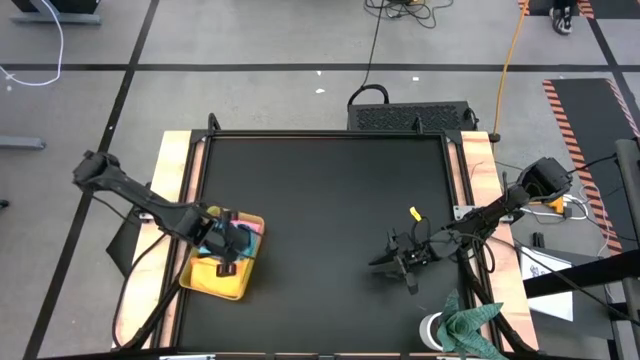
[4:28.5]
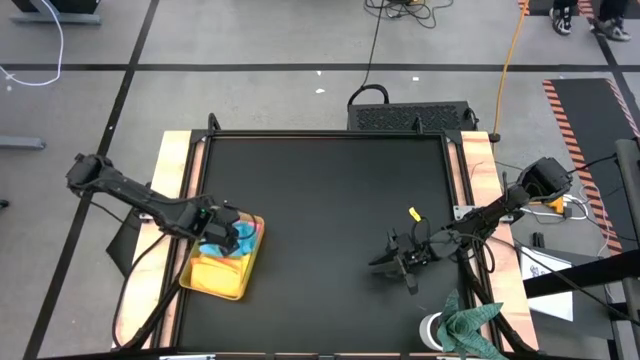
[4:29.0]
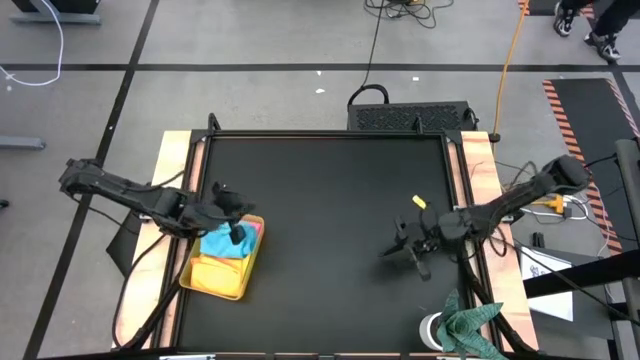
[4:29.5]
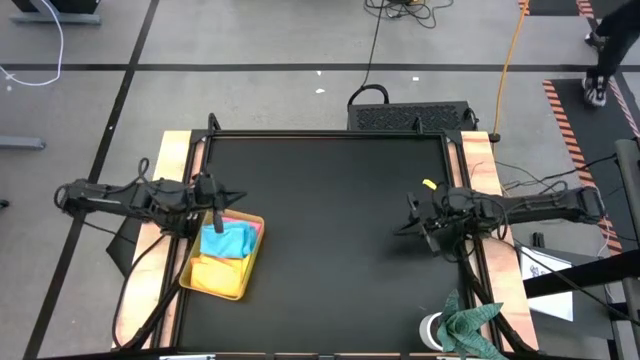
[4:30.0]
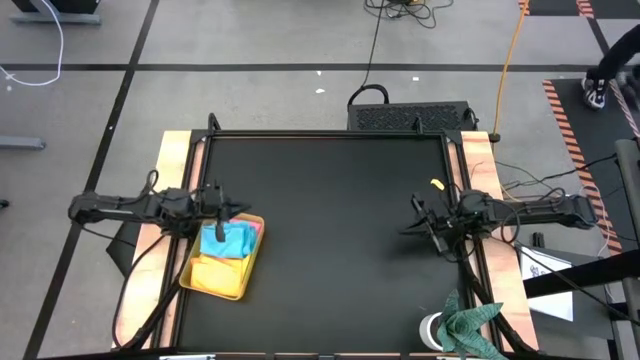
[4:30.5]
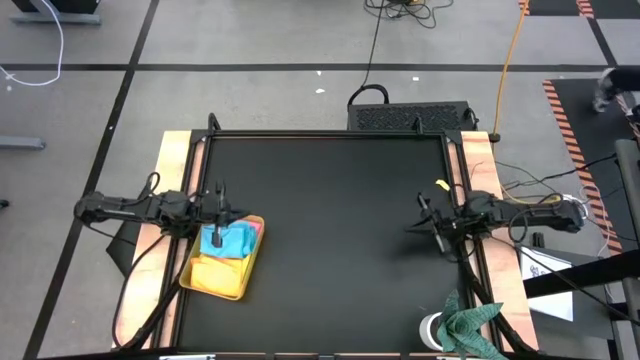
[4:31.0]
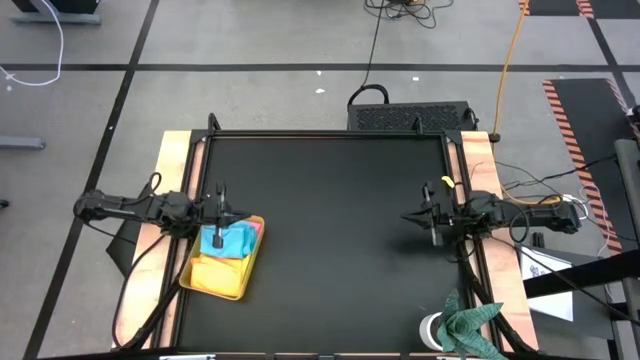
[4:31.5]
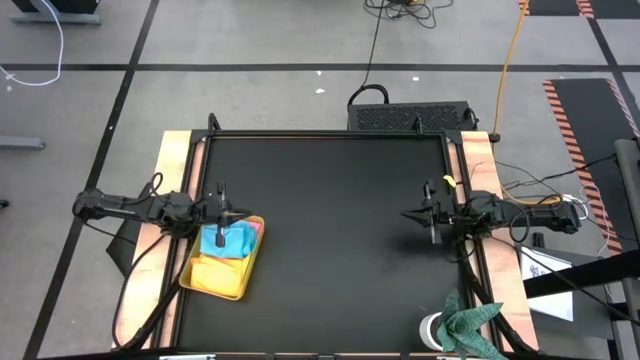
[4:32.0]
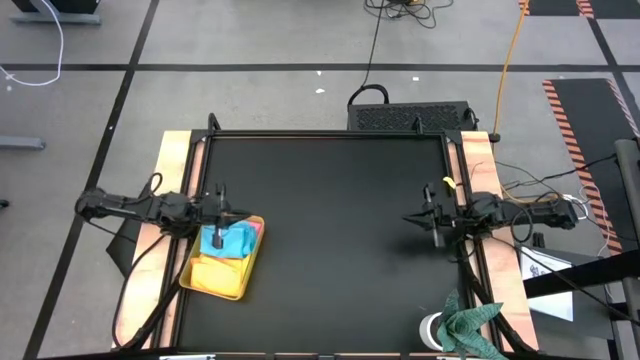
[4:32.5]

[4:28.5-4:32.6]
Task: Fold microfiber towels
Return to Home Position

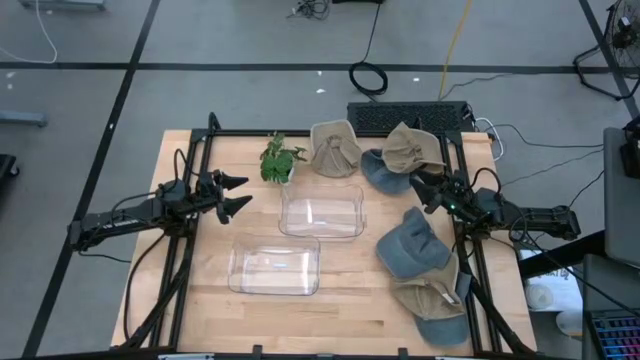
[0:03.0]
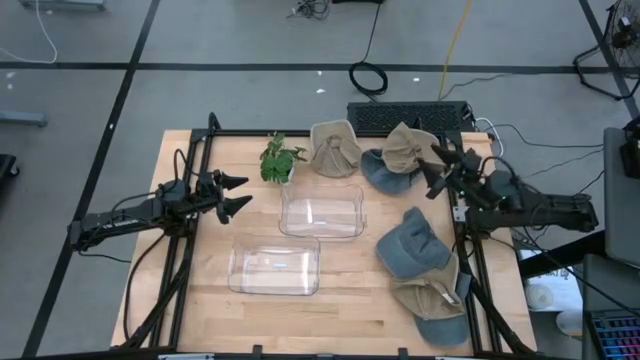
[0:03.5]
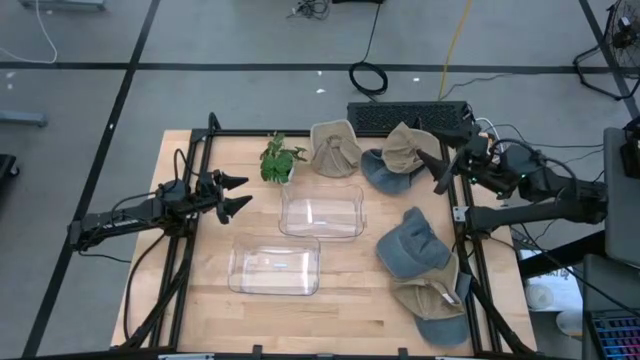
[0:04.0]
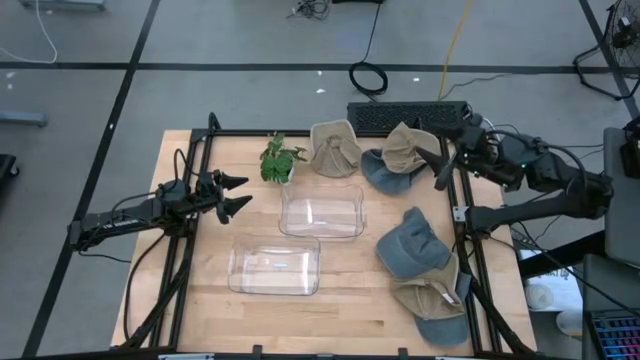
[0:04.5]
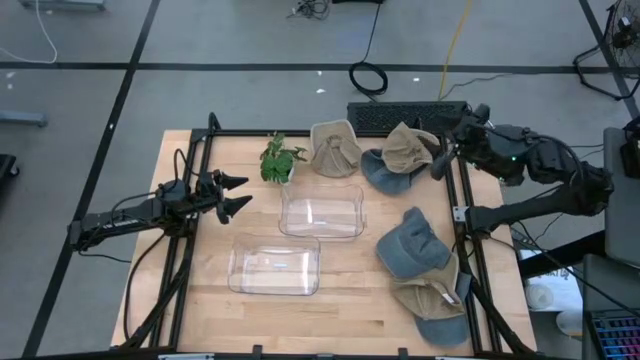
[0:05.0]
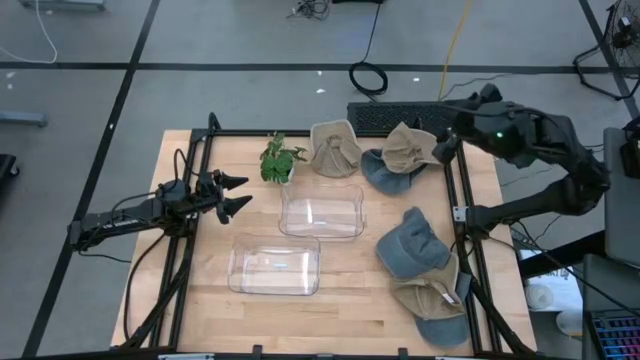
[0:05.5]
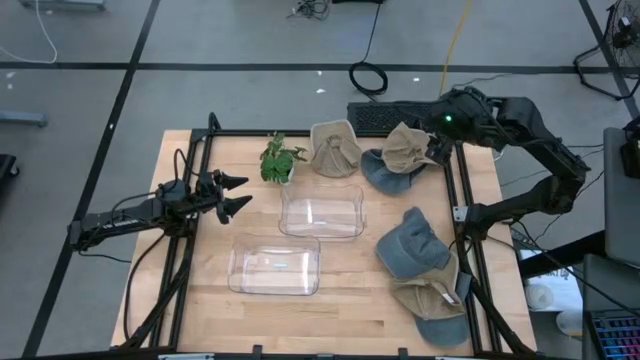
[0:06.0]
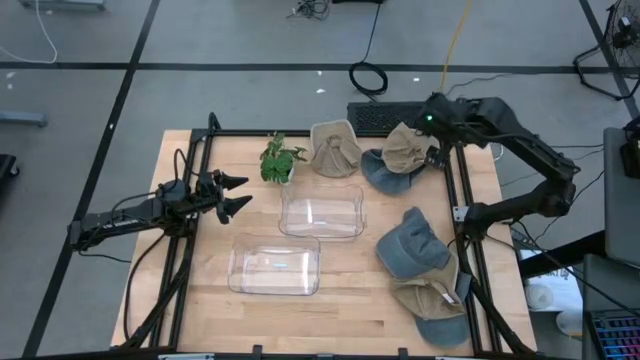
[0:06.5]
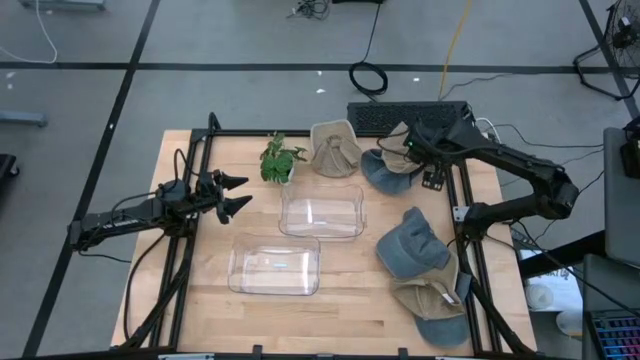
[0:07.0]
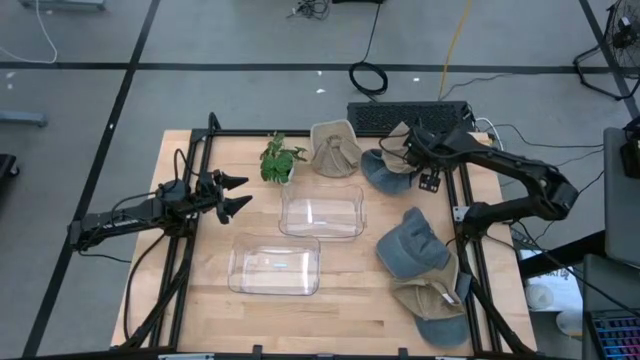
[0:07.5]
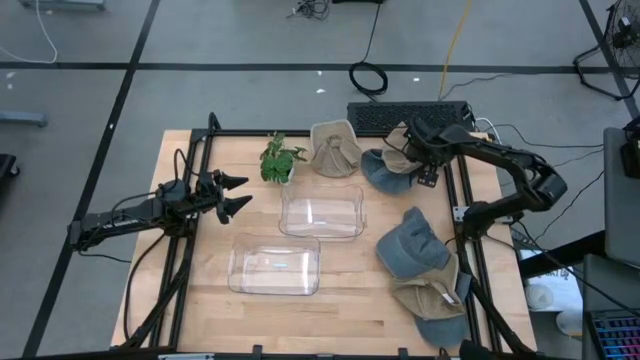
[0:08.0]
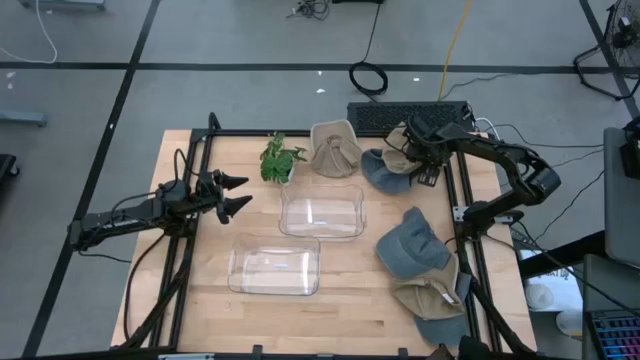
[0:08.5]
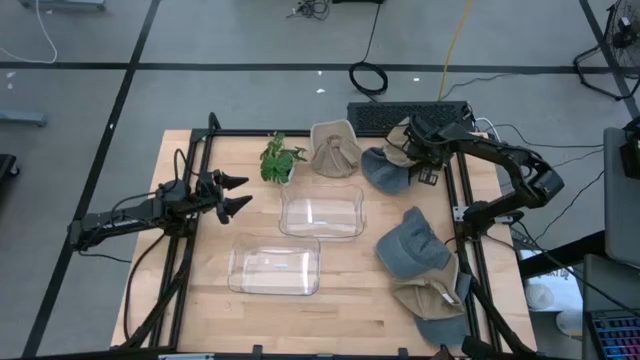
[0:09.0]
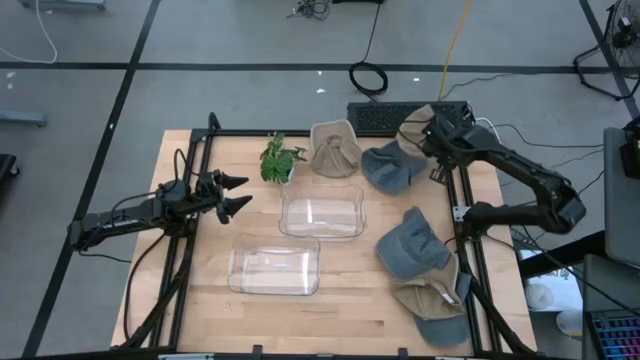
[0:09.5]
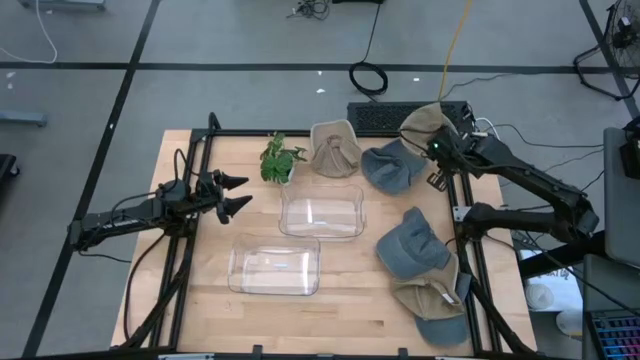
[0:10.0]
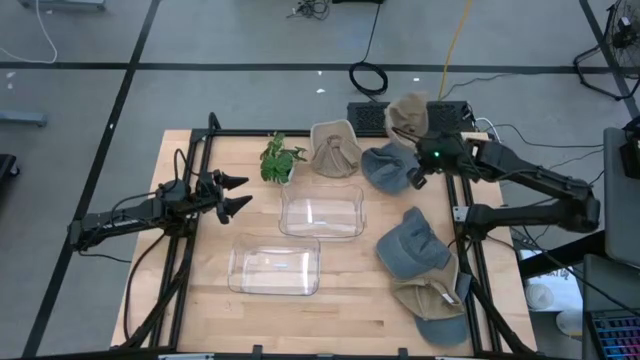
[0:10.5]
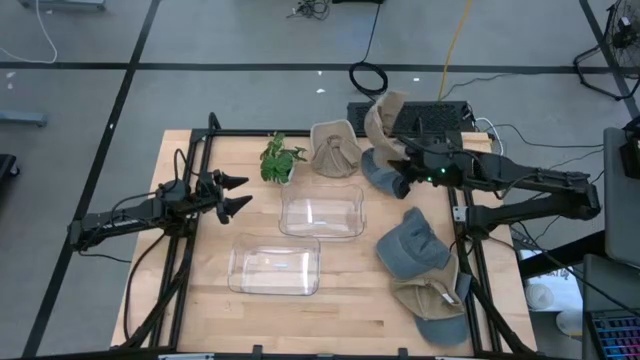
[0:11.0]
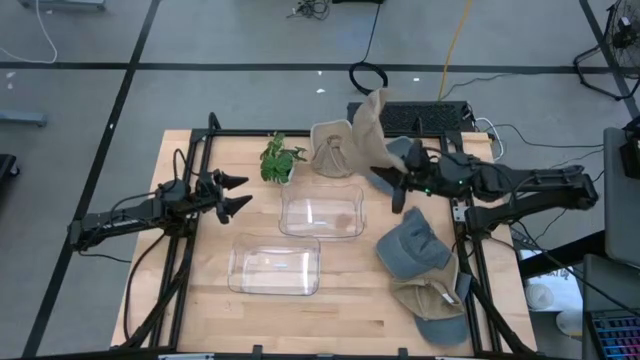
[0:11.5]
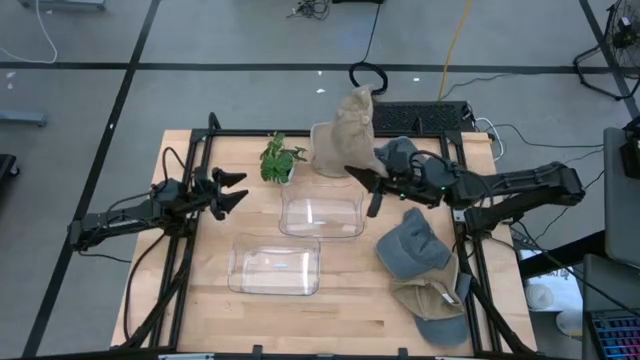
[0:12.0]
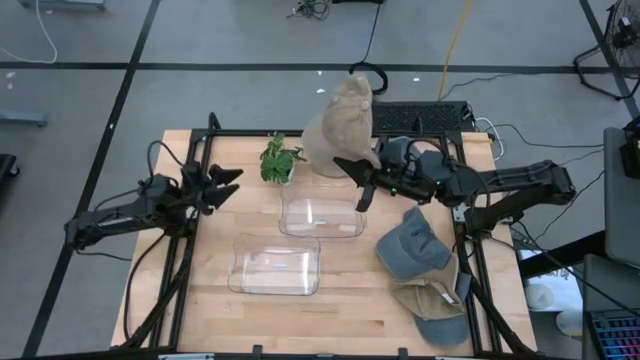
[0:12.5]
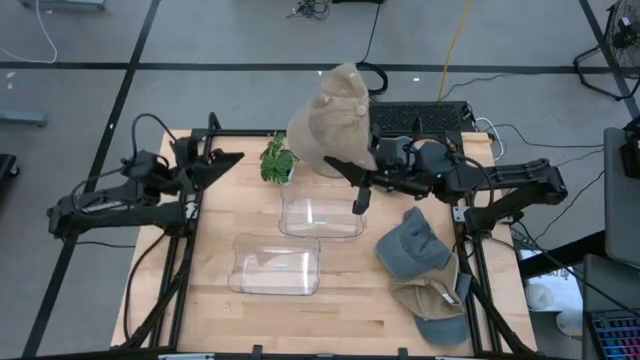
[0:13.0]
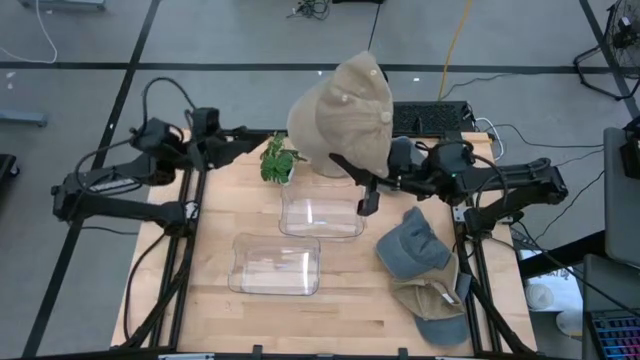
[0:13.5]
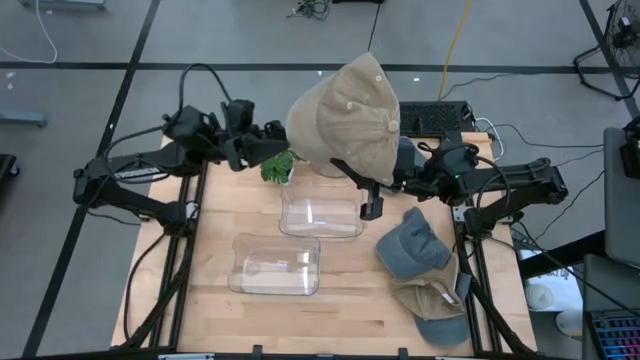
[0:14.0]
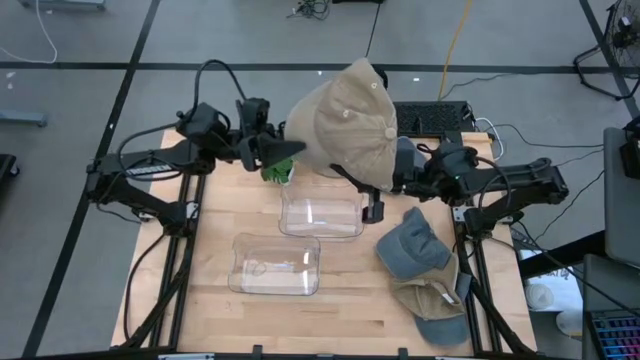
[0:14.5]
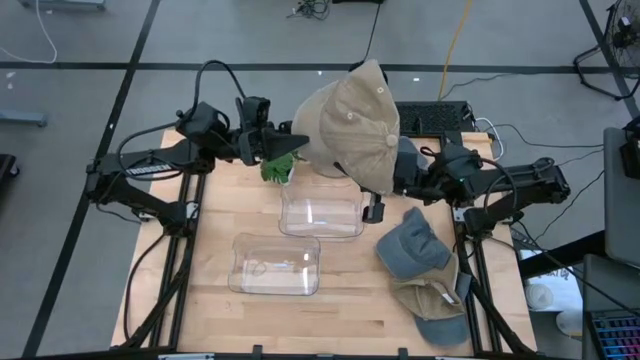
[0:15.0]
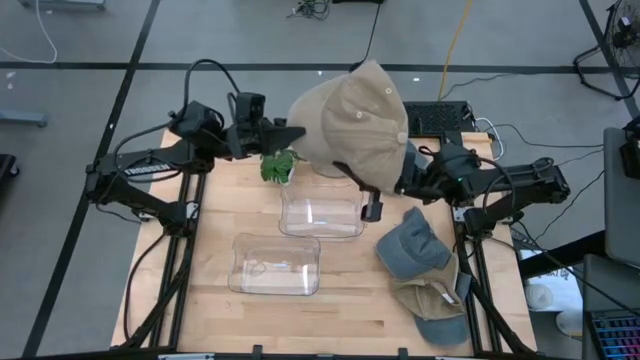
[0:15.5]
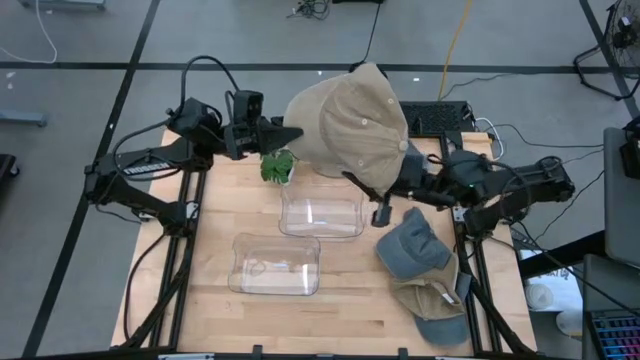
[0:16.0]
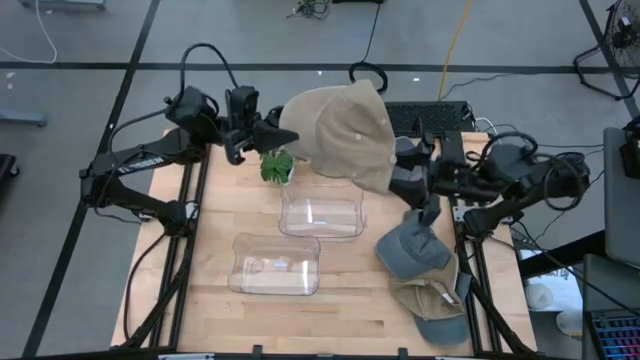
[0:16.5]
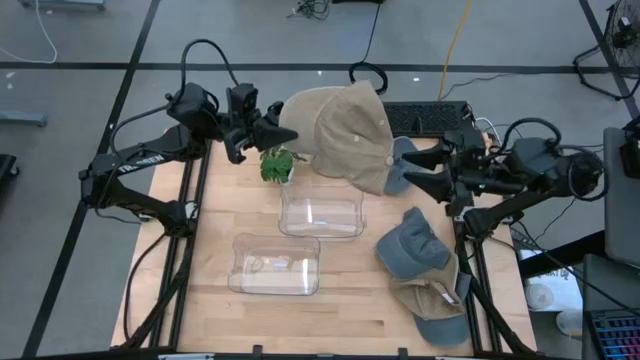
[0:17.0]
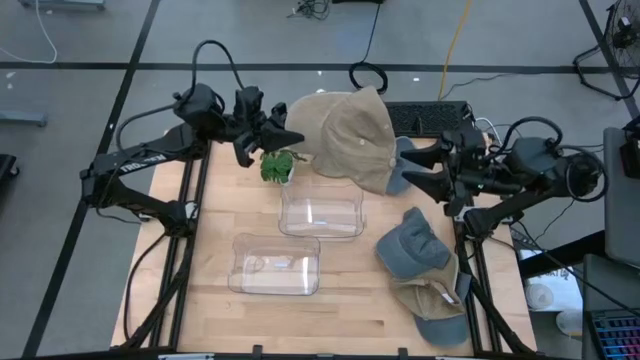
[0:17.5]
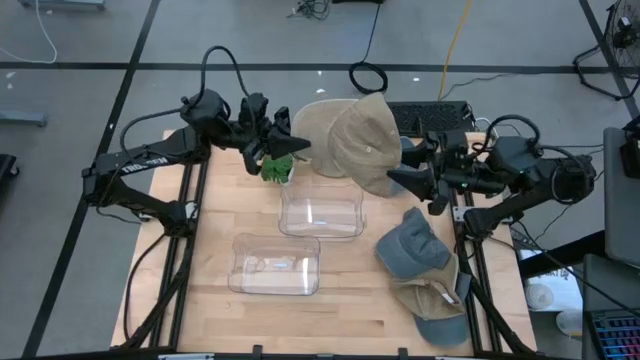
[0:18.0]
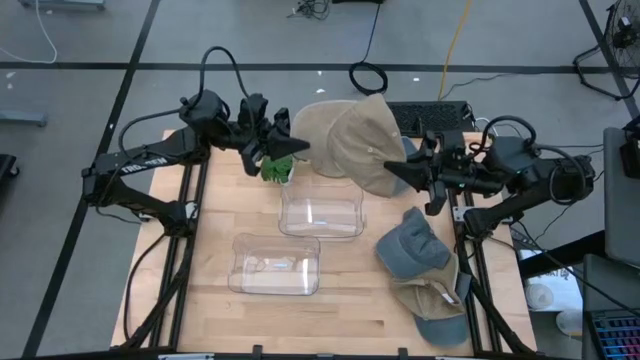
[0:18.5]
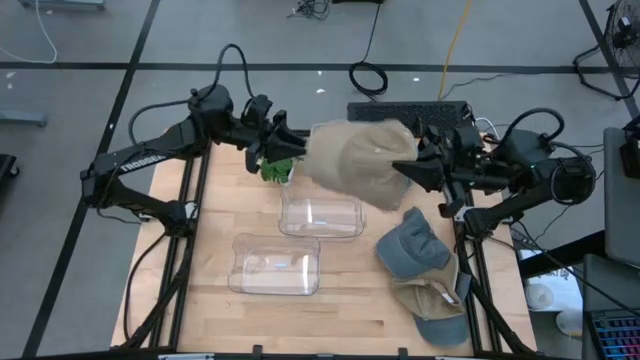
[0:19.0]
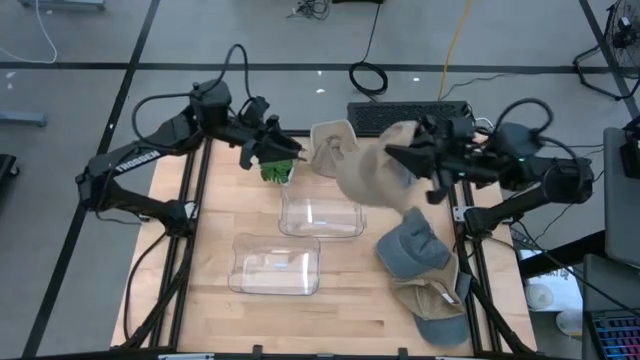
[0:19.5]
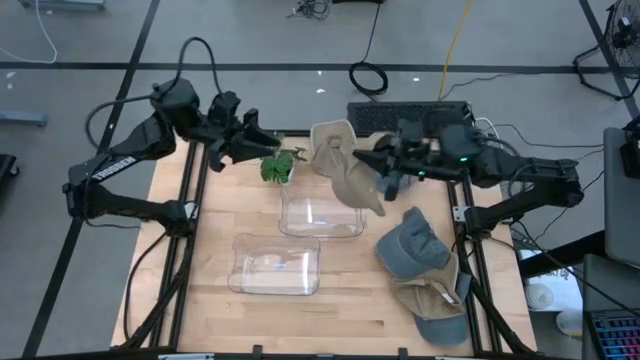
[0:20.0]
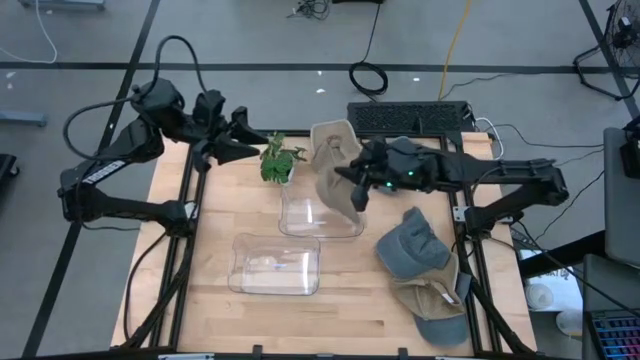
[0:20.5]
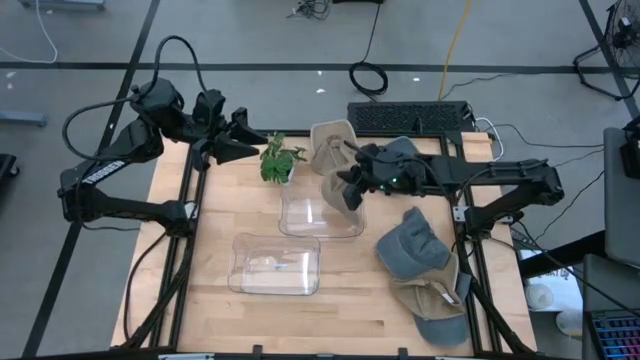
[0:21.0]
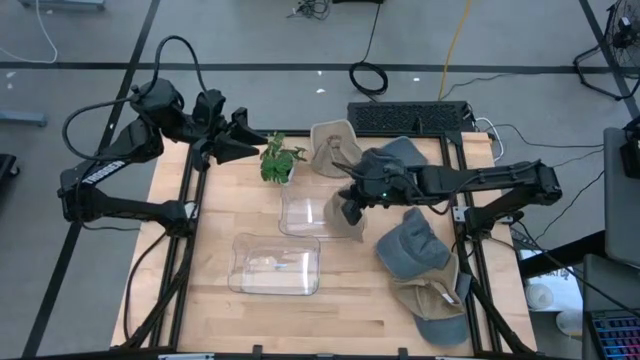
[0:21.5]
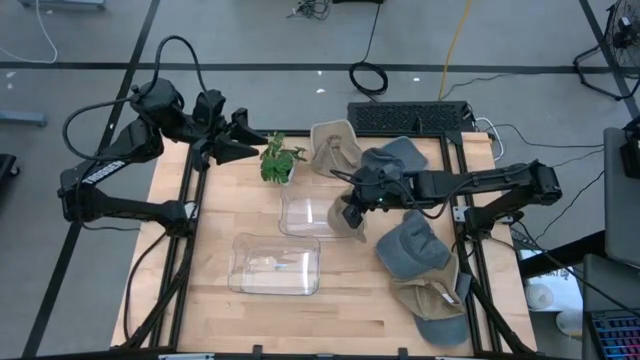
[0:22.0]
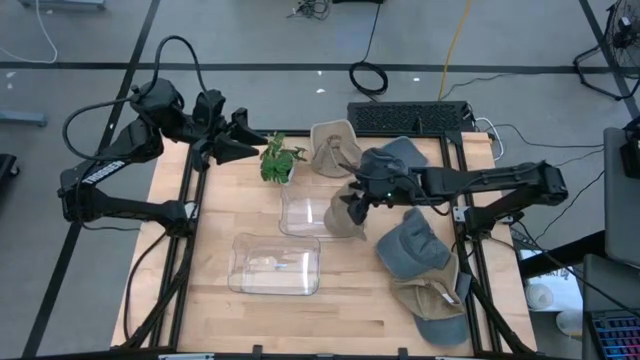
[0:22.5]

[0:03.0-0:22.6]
Task: Pick & Place hat
Put the top right brown cap into the top transparent bin
